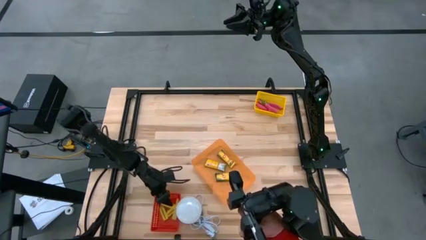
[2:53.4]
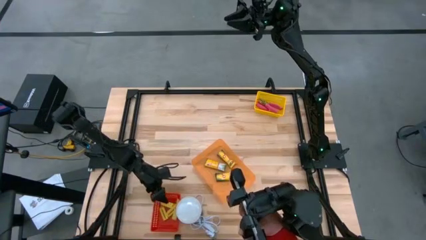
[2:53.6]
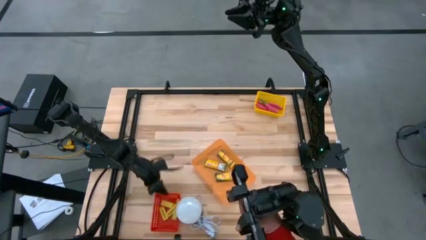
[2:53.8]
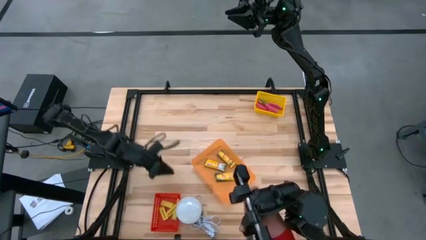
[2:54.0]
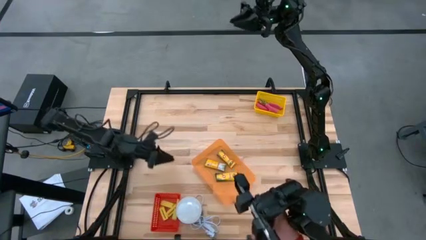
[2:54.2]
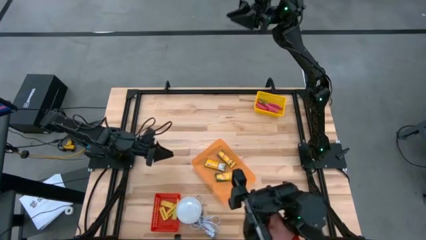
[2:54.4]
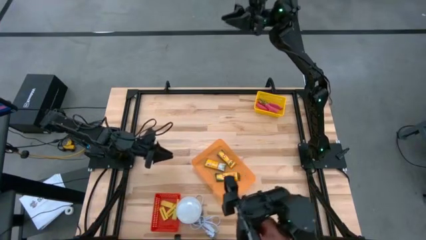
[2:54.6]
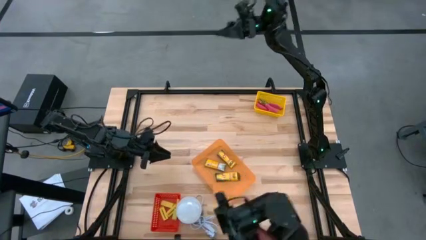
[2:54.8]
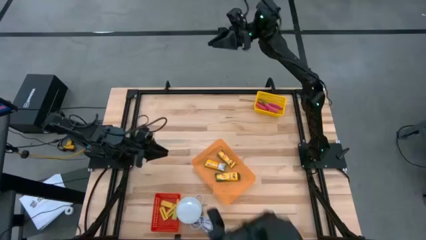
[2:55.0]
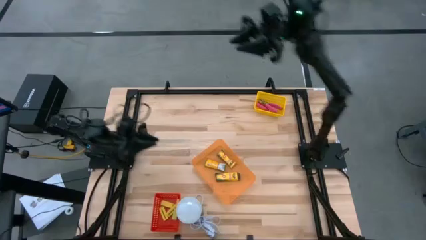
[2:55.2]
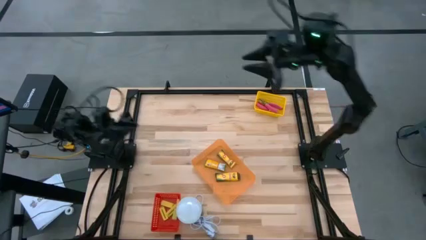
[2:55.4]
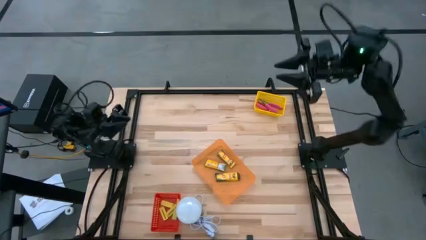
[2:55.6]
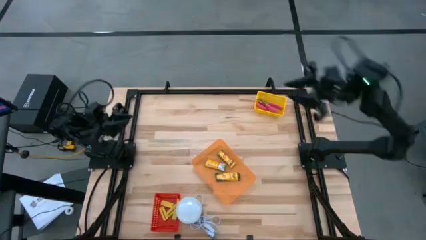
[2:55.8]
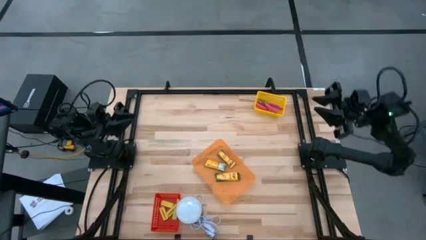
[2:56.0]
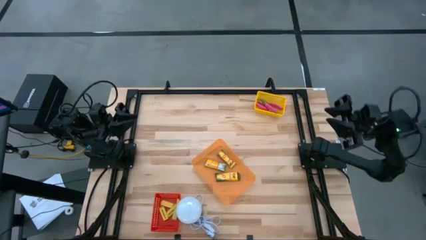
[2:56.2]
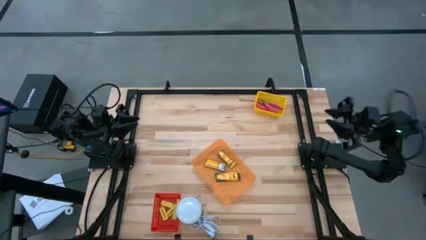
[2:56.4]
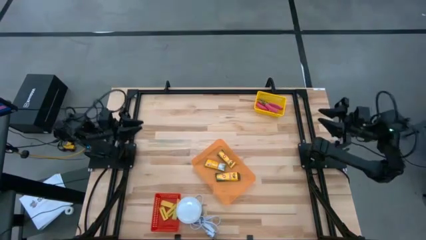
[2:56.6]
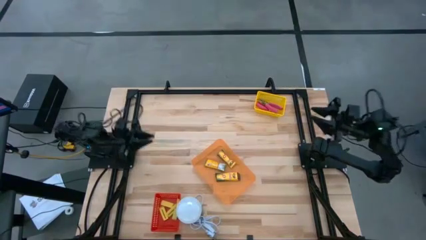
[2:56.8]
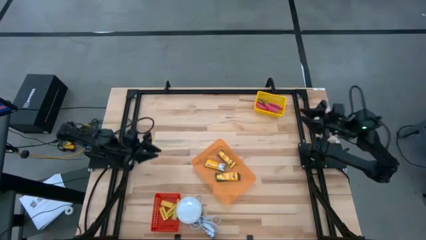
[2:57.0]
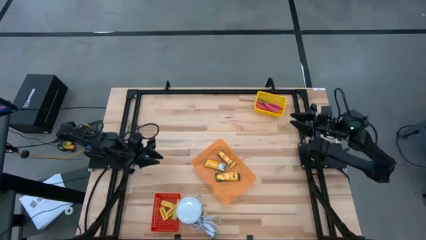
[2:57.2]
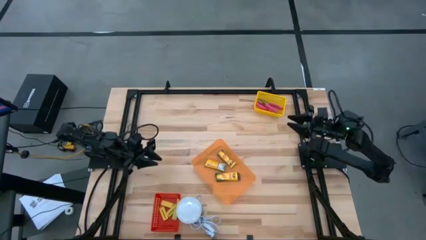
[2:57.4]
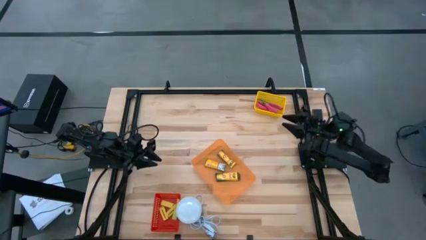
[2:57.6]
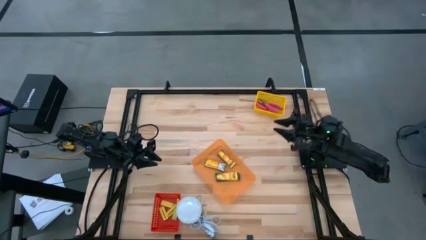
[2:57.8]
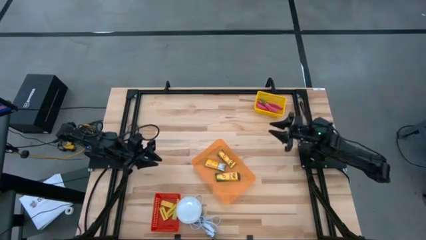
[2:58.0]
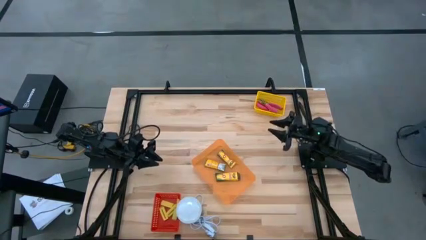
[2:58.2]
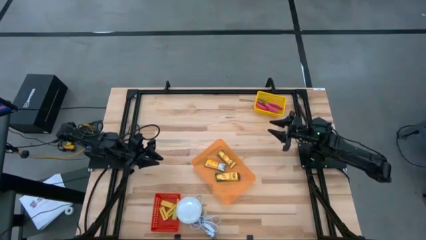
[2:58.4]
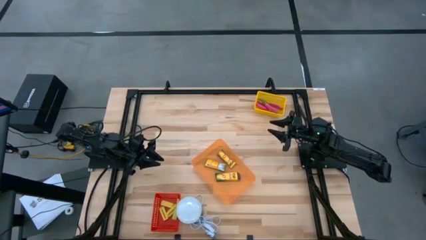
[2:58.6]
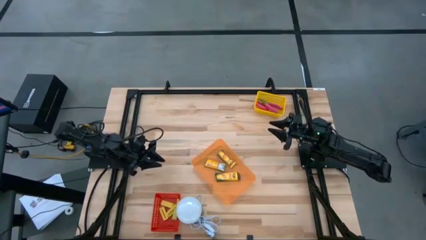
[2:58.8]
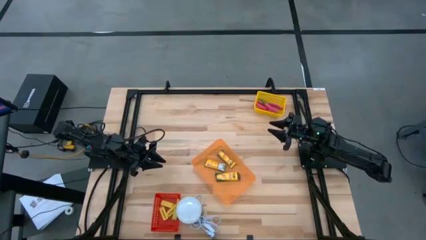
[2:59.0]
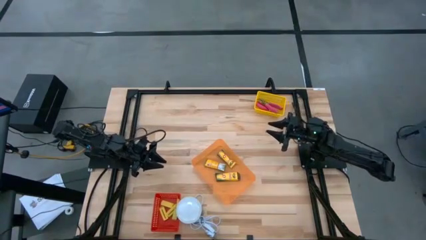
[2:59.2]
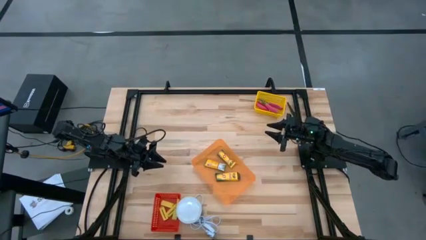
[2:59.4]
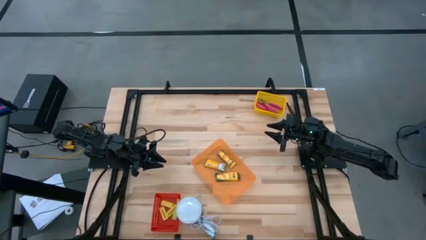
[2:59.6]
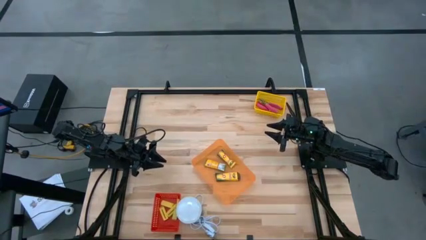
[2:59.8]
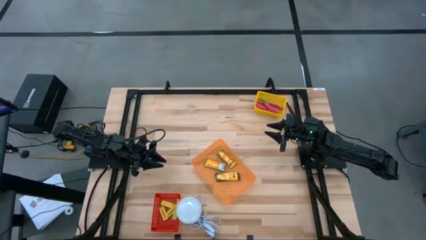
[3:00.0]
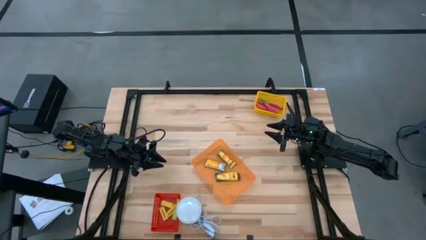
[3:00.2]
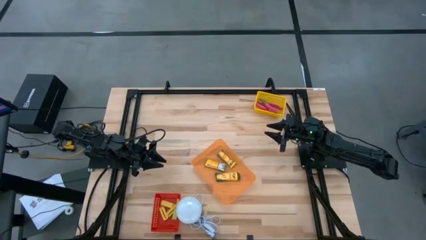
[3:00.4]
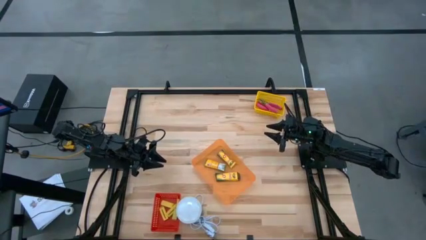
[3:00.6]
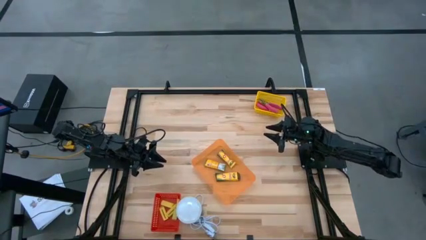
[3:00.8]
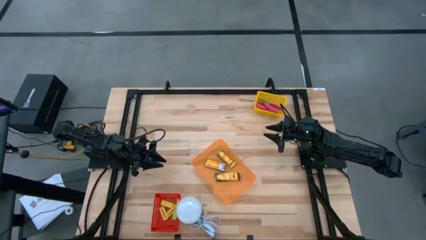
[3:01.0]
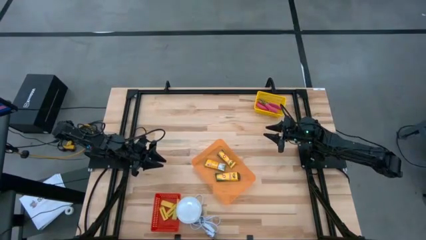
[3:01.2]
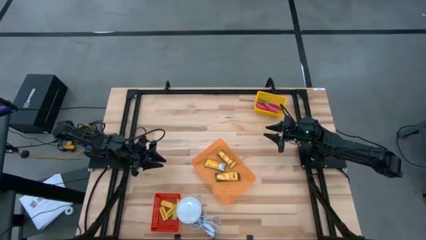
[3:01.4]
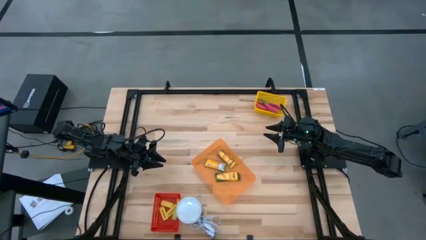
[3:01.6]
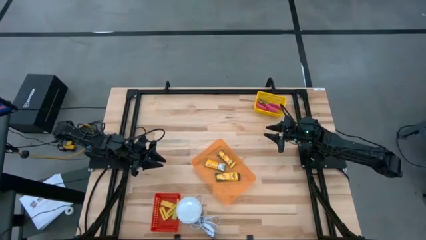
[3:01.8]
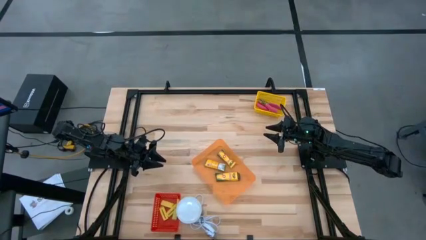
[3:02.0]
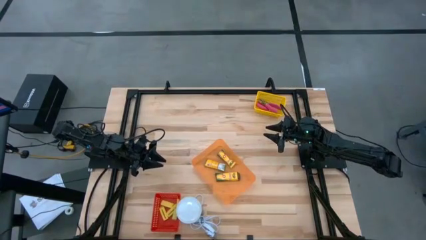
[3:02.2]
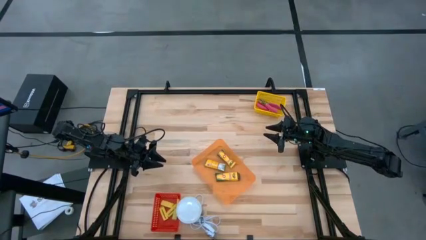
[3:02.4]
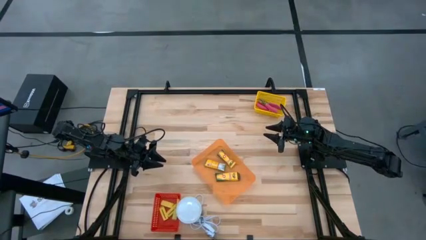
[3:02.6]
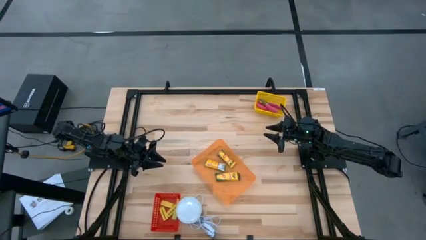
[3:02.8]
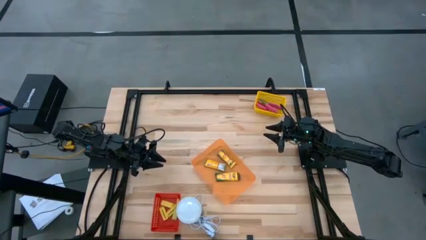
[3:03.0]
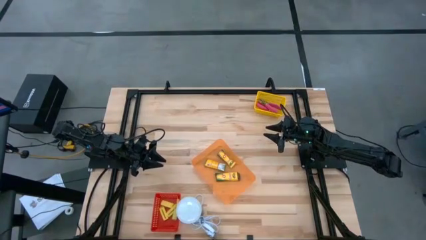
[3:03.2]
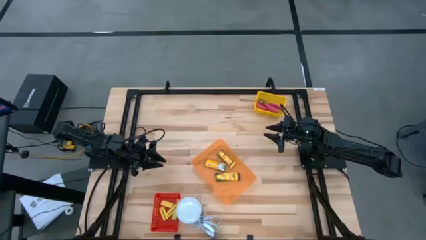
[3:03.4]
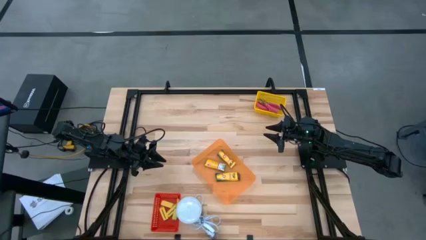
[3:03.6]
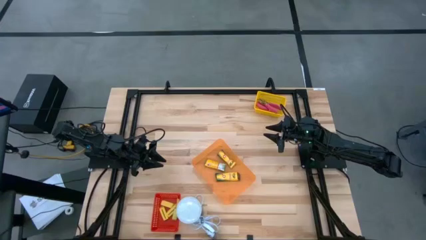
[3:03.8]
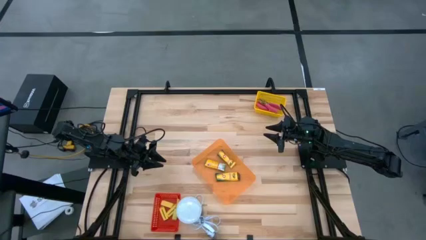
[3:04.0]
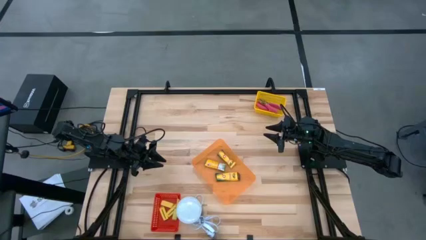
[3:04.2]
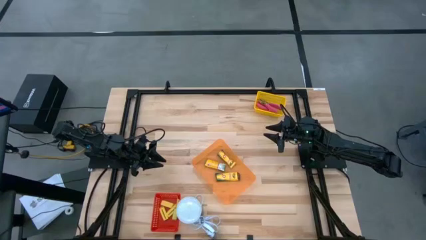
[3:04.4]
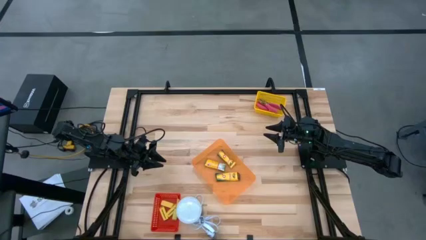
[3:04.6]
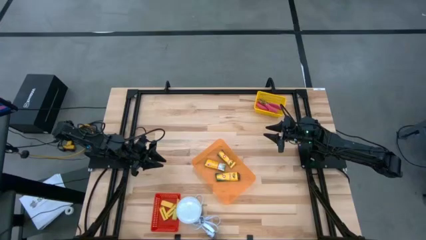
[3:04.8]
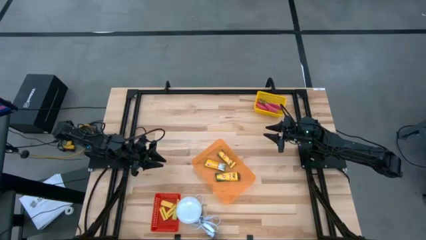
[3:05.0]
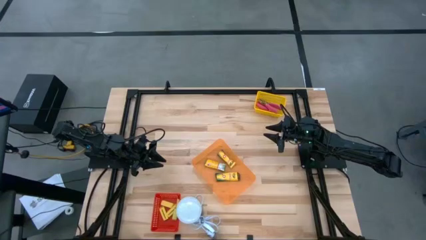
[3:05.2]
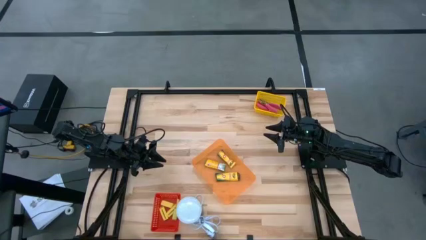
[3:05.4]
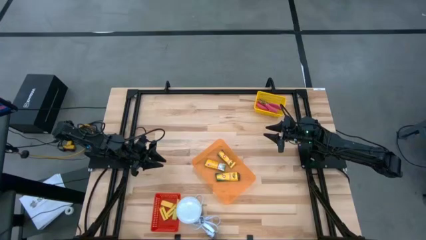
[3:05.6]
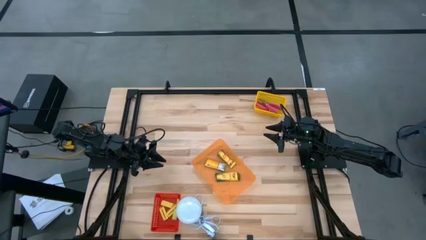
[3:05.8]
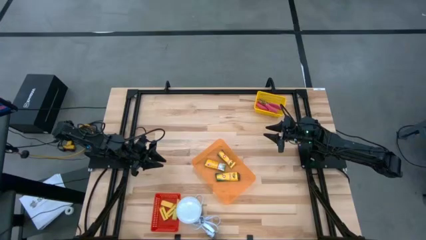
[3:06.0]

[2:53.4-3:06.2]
Task: Pick & Place School Supplies
Return to Home Position

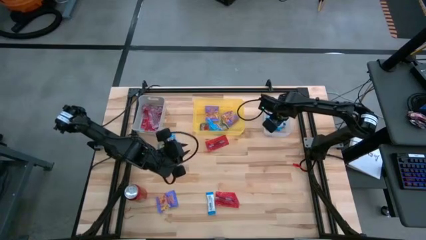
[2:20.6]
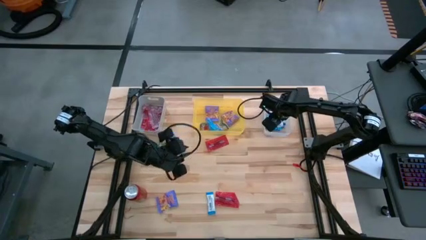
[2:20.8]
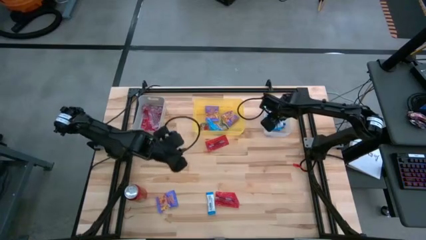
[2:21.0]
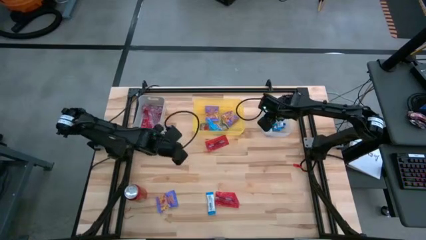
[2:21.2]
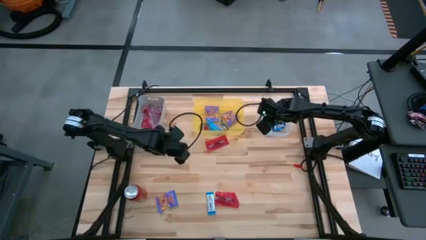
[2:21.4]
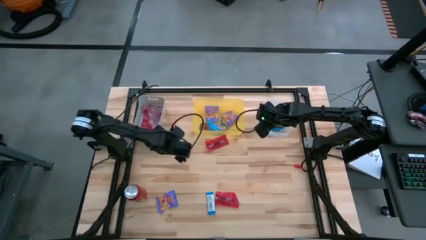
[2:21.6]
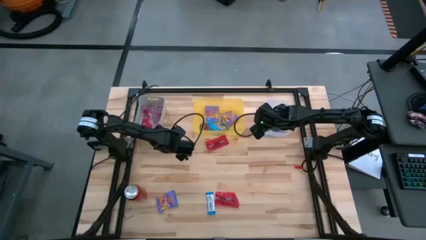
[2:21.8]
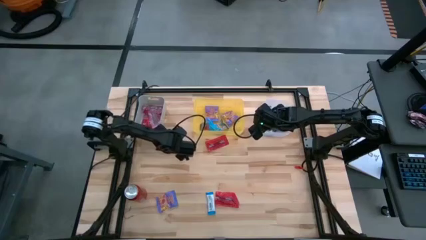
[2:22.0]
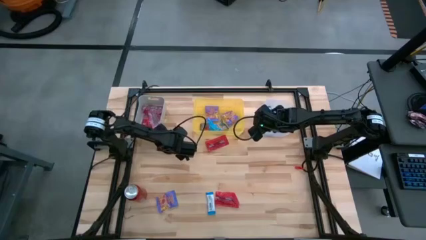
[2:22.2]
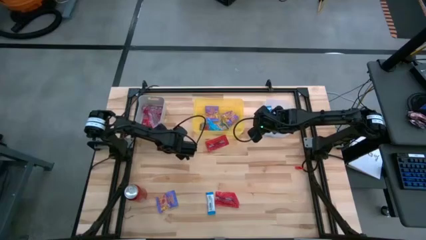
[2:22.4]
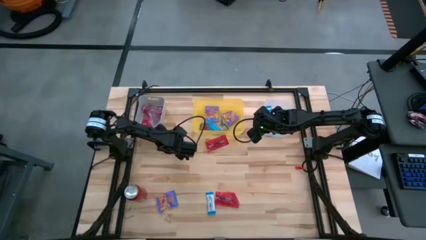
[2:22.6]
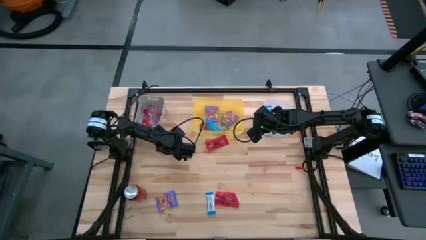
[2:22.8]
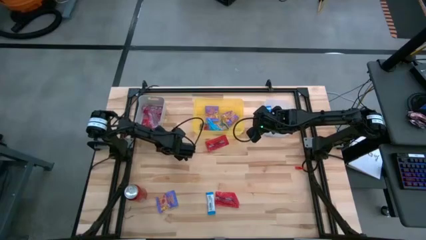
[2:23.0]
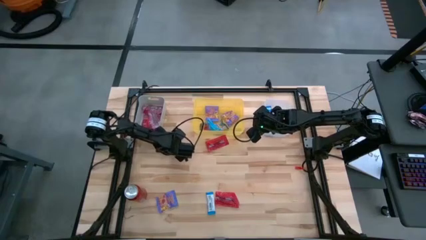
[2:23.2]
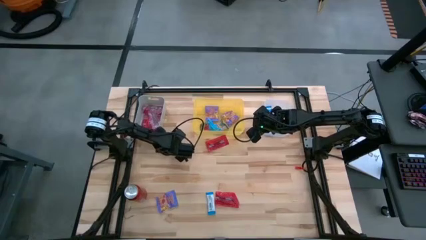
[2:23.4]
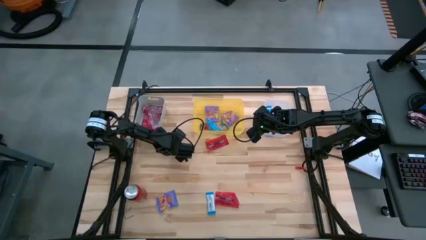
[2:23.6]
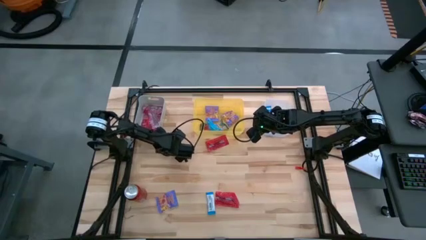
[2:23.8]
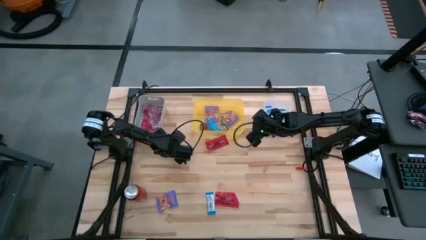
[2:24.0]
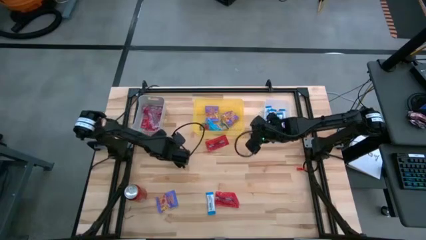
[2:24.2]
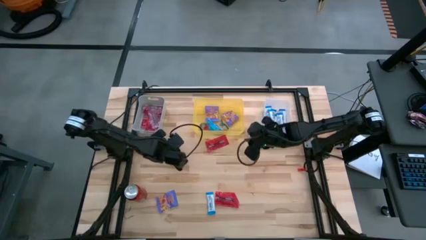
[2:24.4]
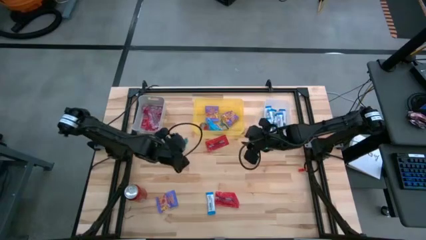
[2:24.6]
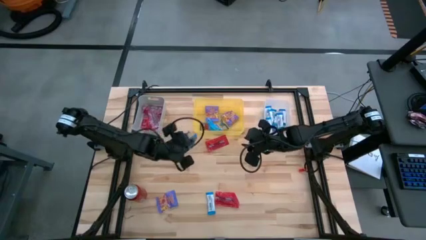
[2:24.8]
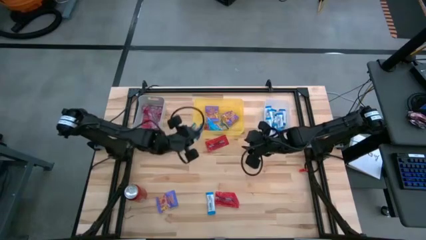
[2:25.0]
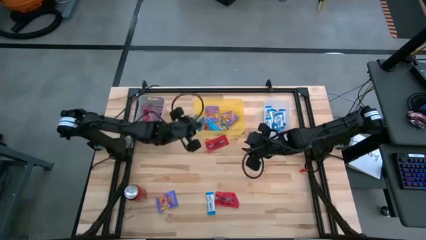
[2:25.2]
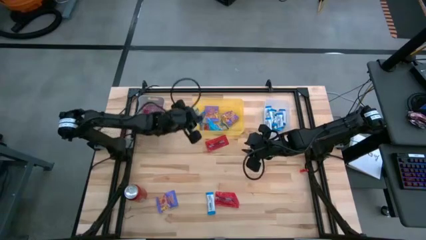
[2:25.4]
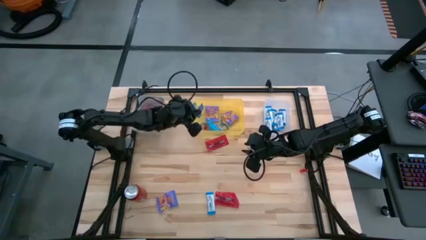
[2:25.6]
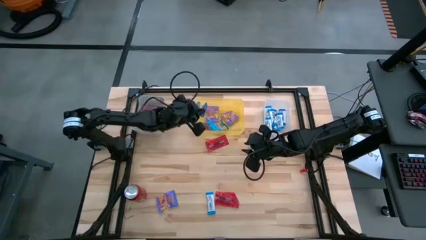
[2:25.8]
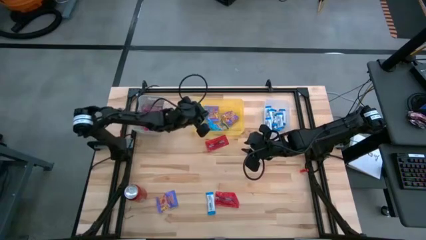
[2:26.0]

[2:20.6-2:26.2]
Task: Sort candy
Put the blue gummy into the yellow bin
